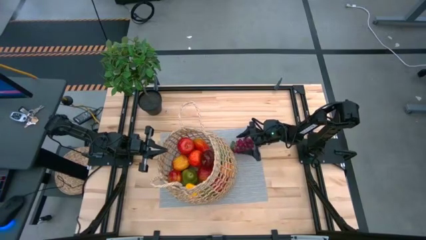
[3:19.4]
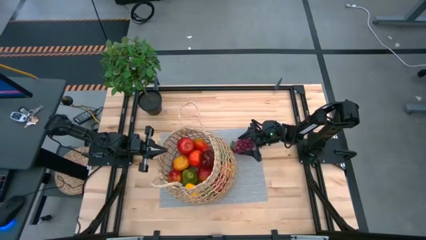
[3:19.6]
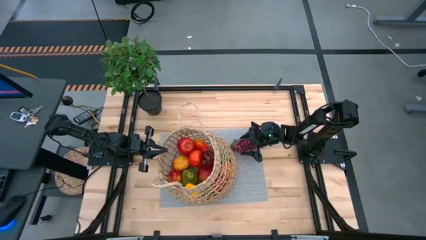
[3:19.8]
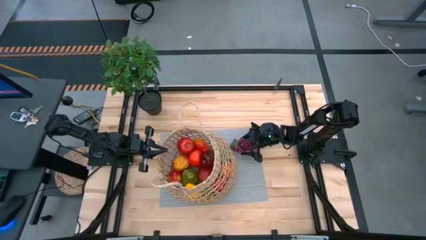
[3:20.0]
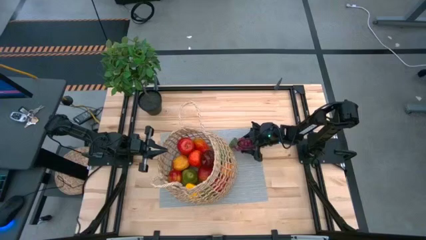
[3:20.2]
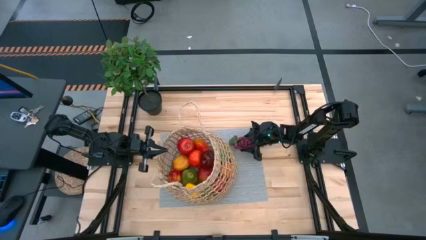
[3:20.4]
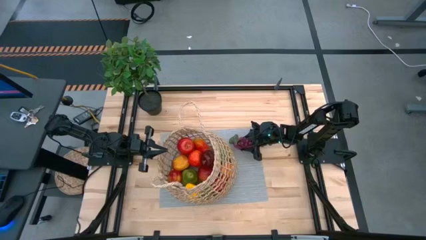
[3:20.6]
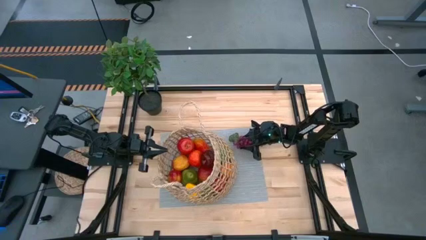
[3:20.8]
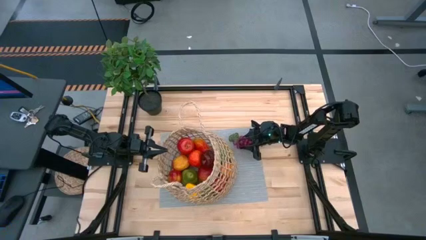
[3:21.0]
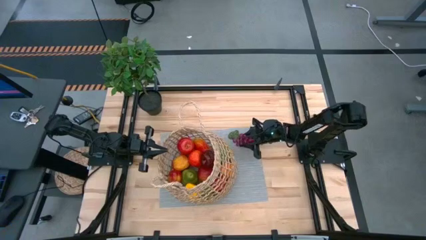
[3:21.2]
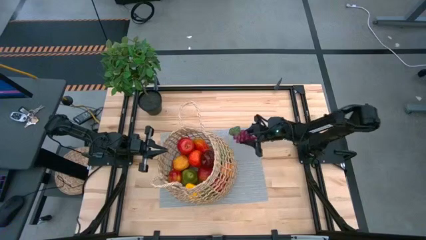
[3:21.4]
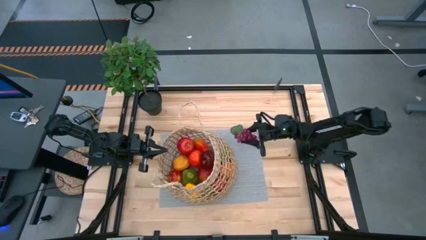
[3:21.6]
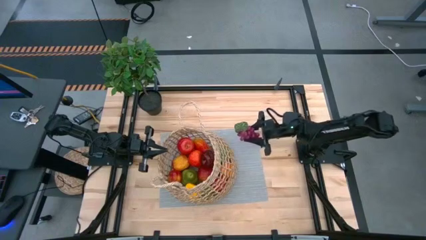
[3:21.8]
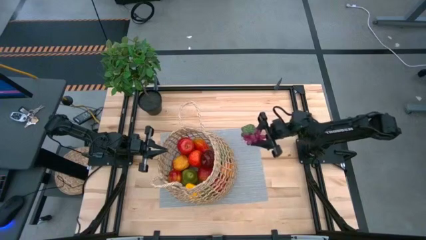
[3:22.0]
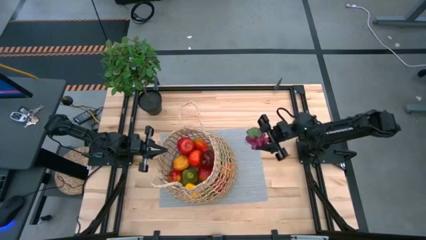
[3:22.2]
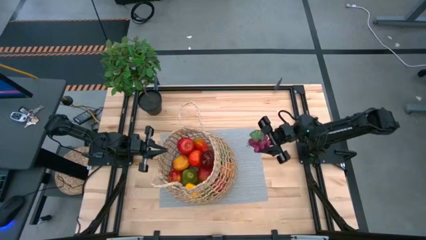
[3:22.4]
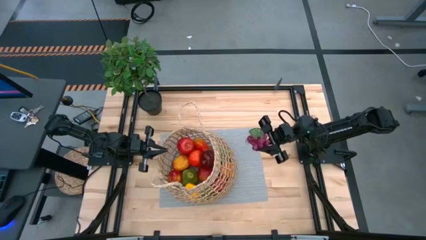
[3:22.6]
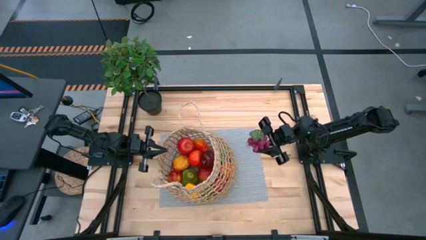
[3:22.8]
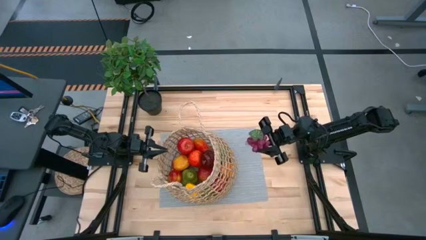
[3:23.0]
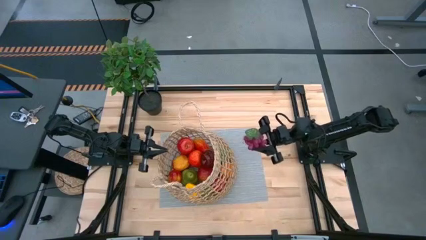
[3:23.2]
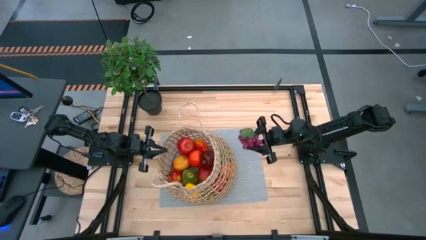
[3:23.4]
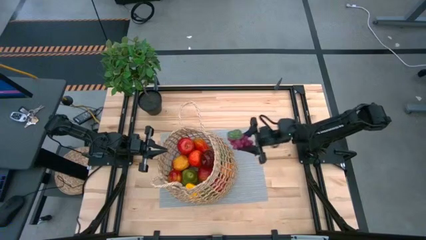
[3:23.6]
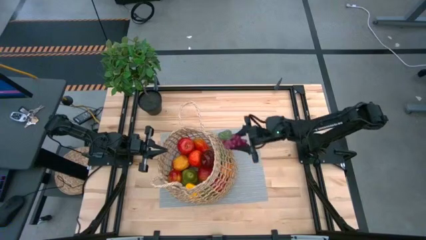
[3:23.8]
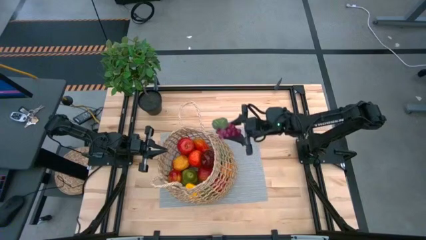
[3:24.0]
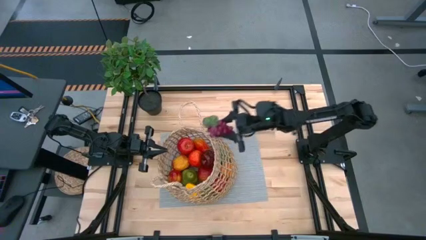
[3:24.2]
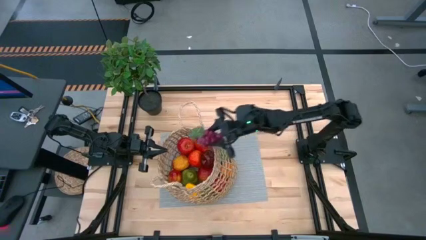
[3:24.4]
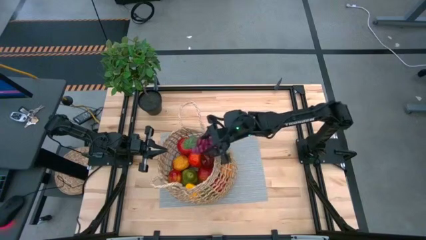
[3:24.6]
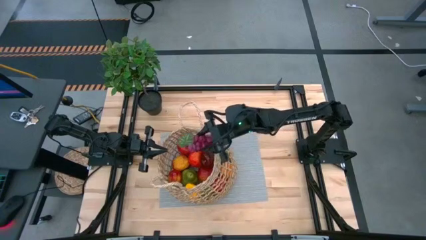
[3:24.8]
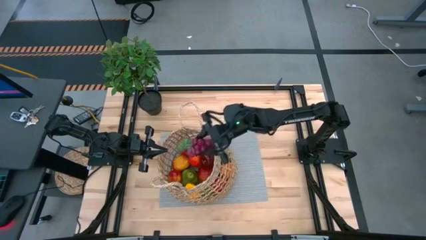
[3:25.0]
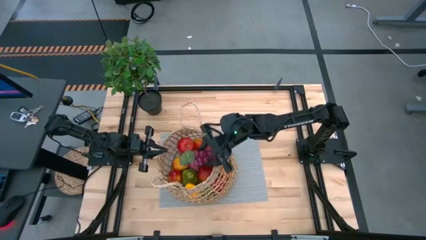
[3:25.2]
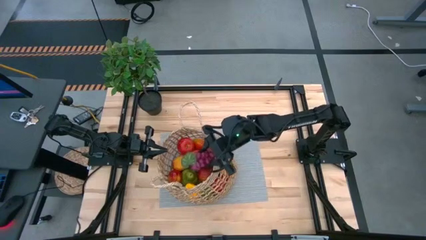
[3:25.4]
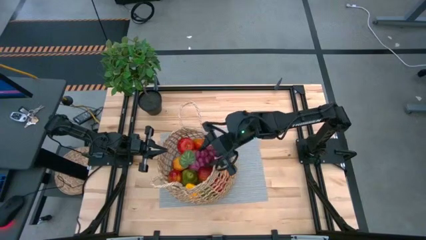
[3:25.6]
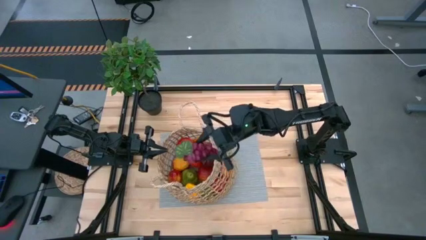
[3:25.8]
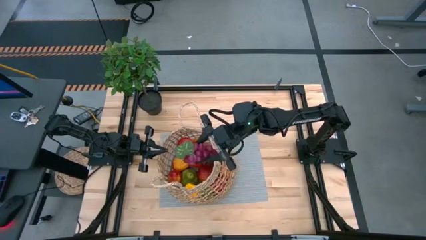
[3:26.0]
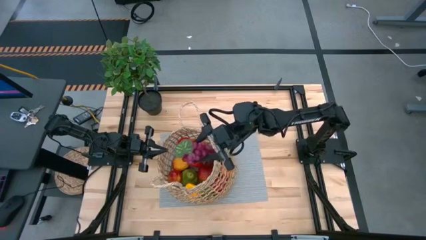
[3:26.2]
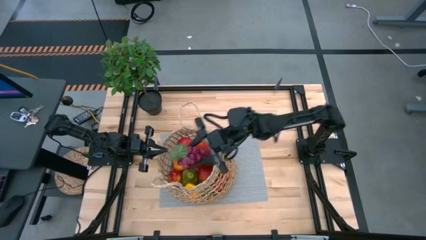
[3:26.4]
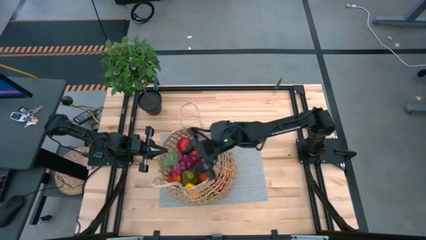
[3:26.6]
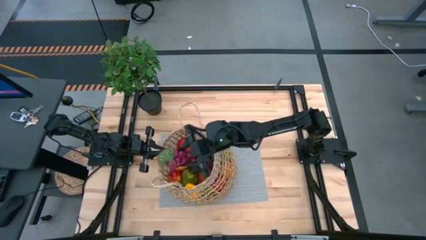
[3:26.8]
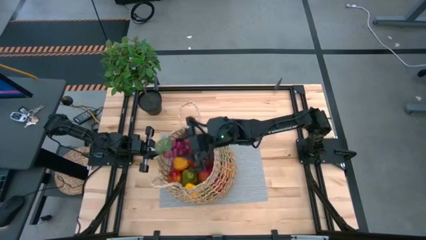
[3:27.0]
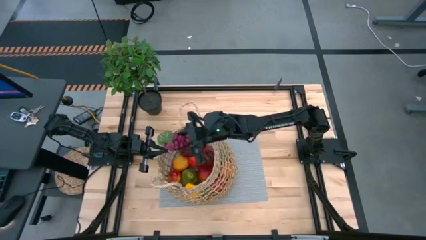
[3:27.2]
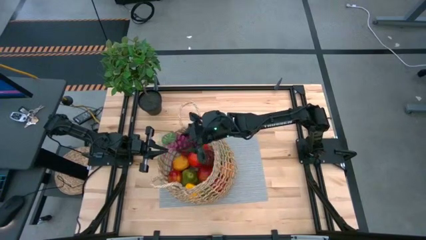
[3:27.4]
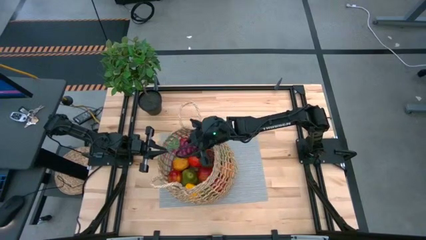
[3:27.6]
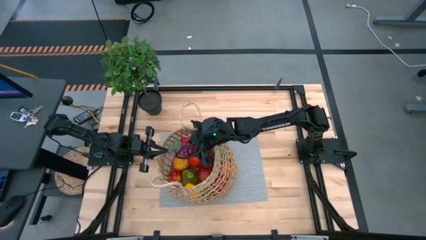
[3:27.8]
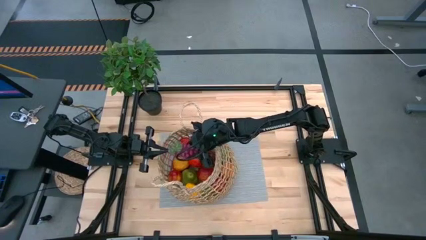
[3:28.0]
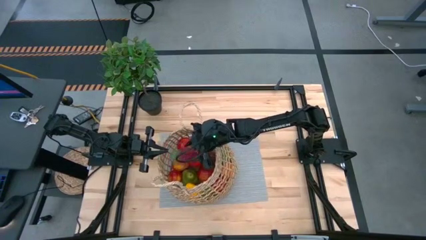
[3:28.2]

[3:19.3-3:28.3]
Task: Build produce basket
Put the grapes into the brown basket

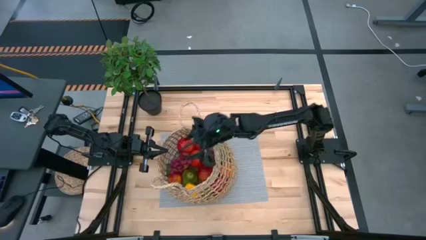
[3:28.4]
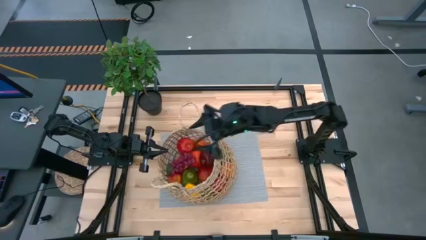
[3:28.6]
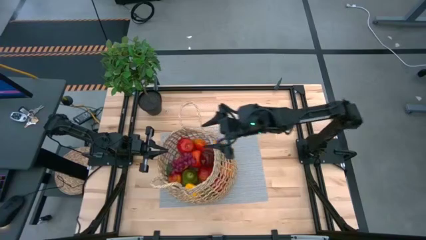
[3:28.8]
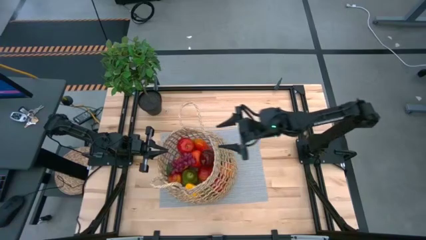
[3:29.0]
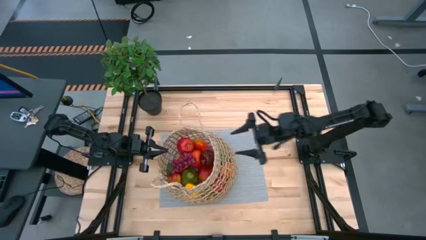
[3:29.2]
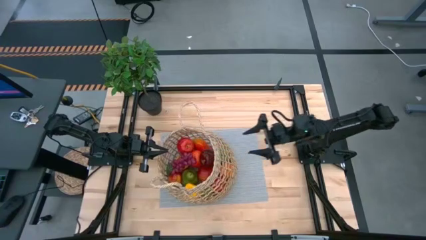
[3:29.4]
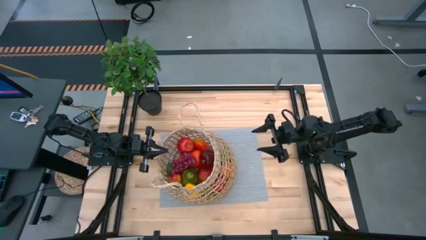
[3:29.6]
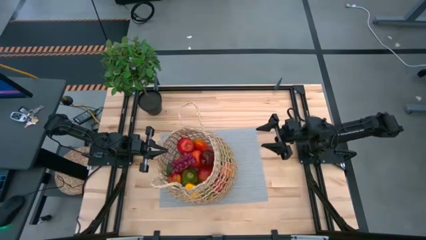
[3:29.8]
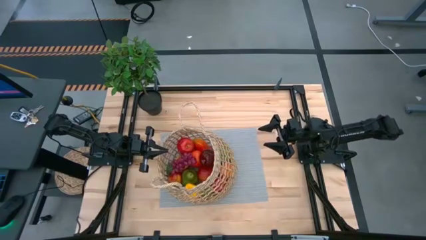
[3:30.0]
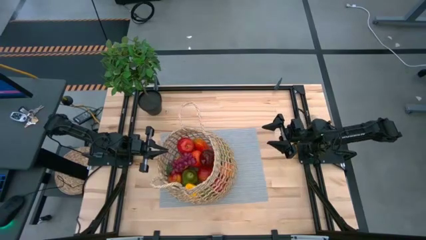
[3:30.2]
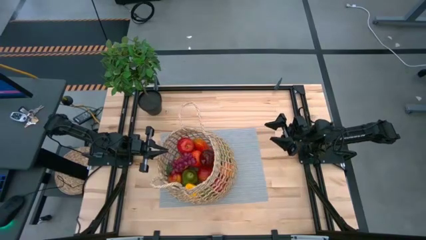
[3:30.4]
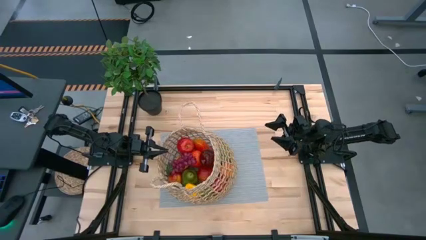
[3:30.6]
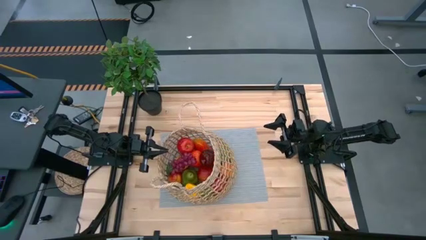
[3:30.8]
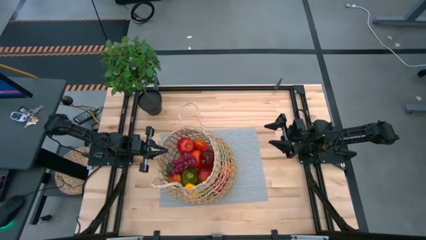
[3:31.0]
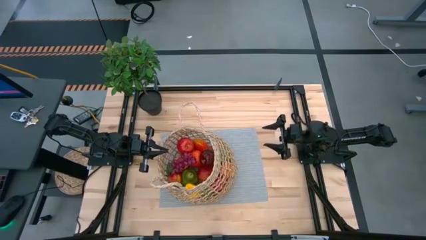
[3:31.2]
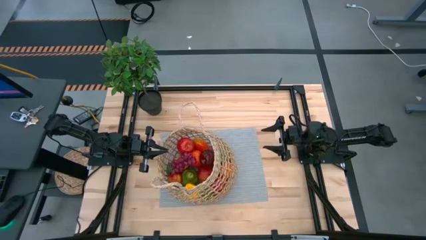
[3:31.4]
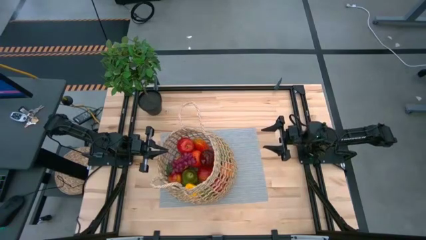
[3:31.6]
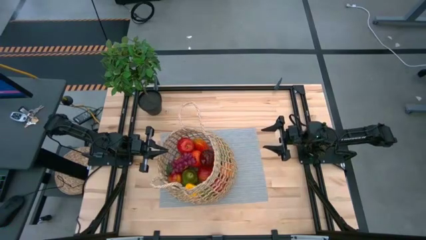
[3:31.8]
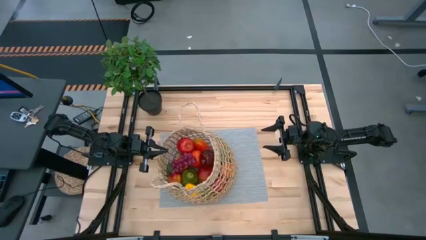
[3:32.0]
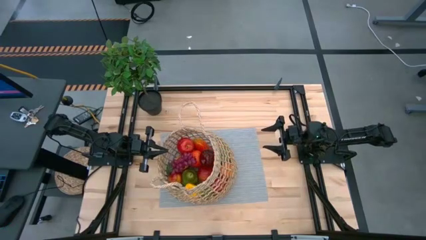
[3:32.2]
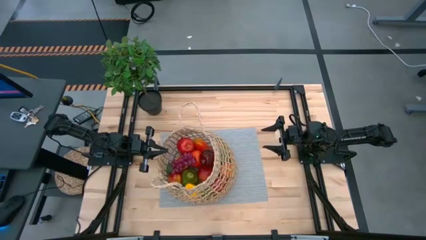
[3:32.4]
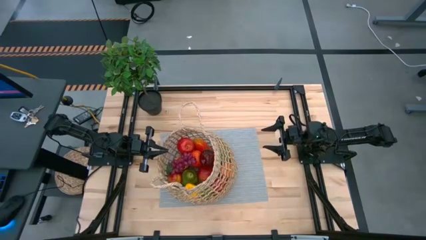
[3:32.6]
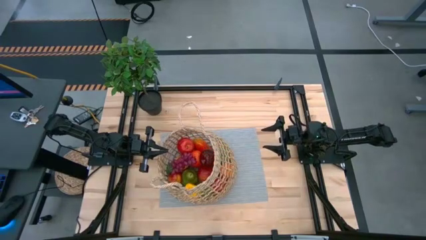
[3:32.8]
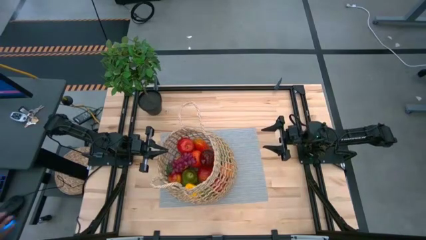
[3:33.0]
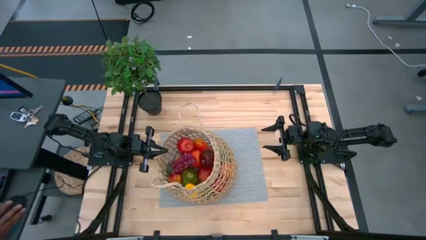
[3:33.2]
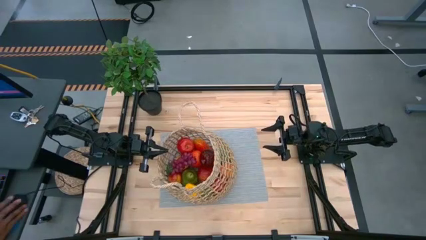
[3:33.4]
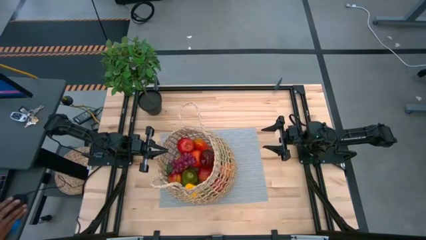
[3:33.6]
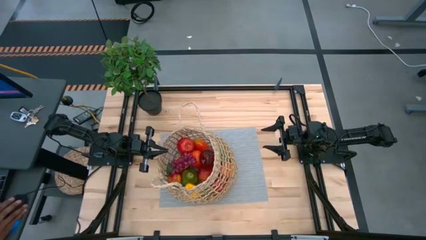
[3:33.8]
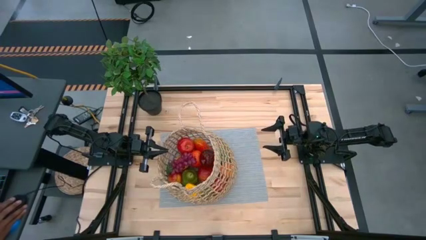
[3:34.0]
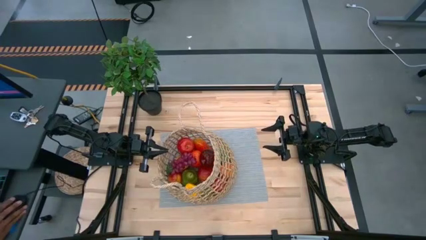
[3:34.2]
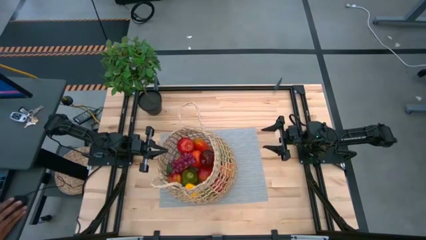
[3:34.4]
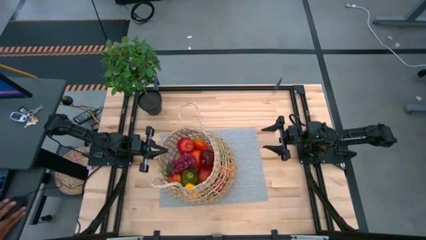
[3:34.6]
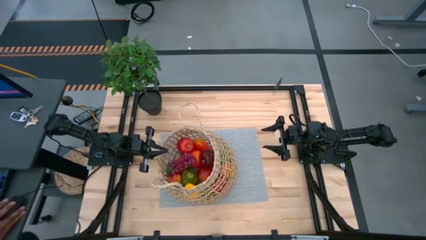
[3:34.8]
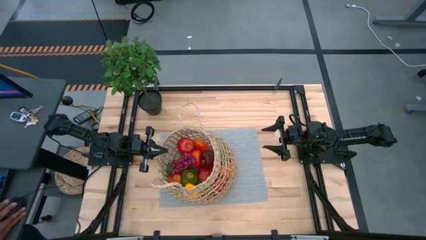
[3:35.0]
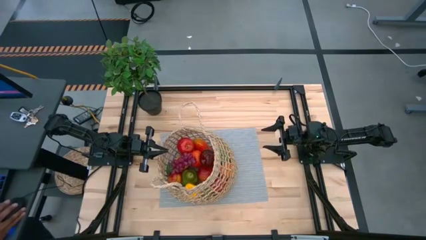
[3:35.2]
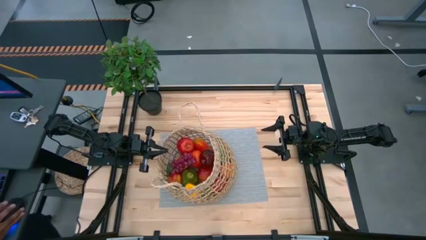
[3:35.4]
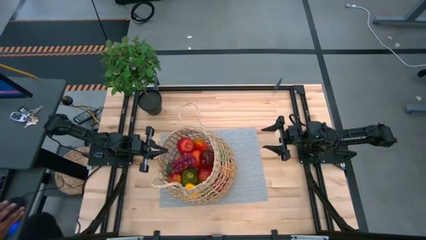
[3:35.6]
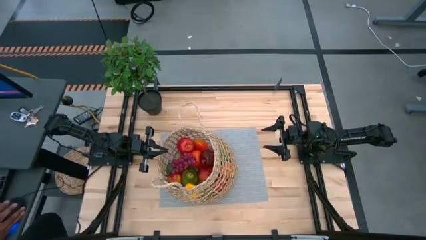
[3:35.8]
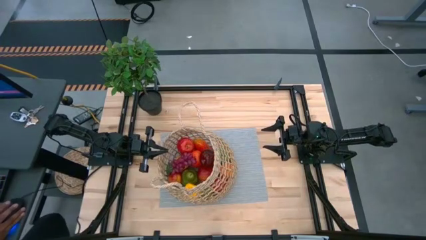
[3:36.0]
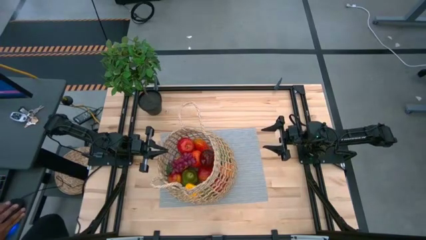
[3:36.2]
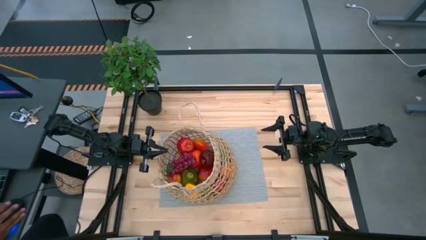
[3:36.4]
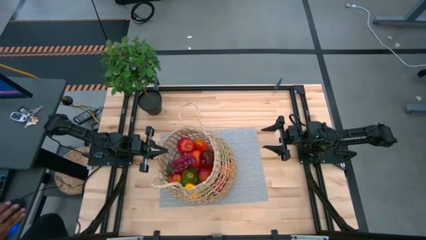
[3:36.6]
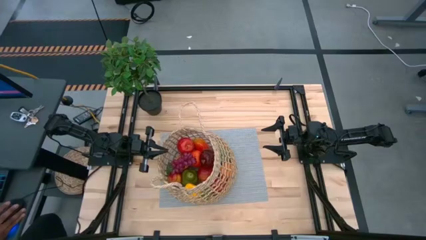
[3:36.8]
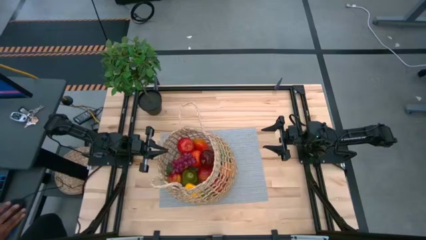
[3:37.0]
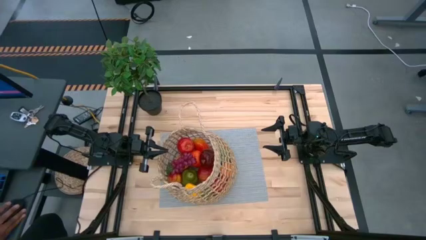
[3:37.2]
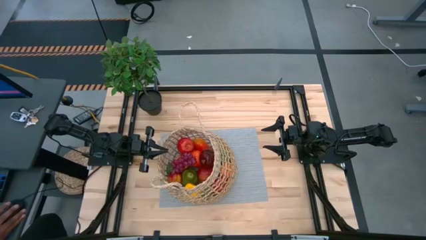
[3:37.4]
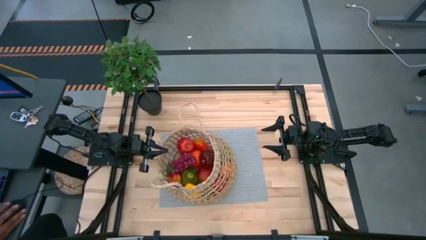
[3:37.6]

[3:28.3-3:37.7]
Return to Home Position
